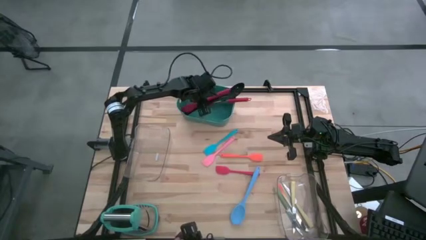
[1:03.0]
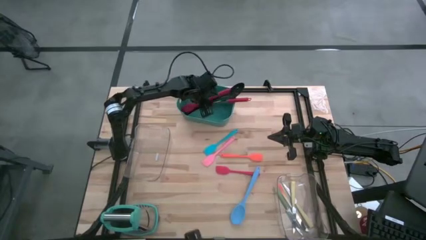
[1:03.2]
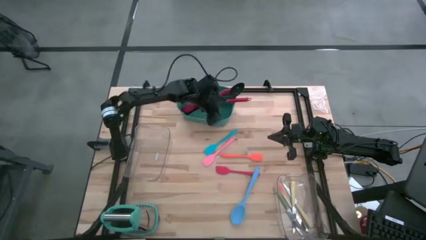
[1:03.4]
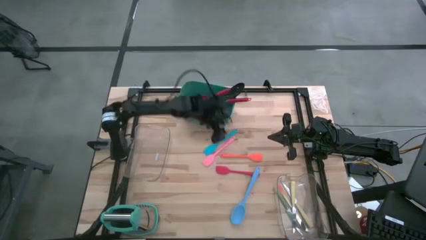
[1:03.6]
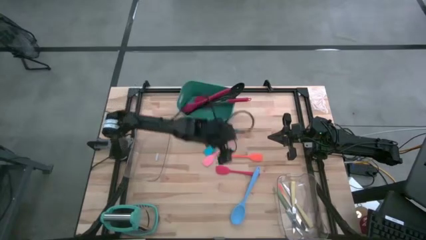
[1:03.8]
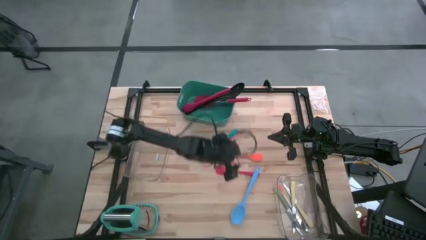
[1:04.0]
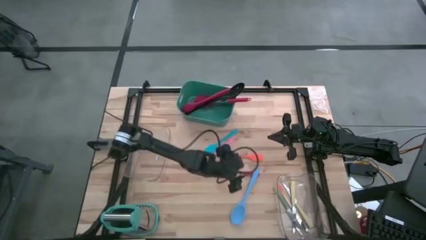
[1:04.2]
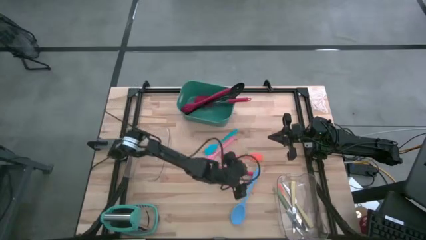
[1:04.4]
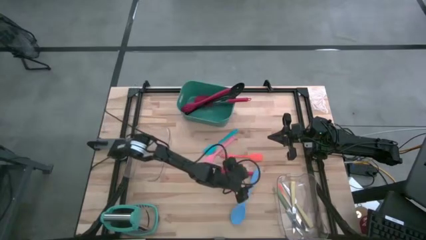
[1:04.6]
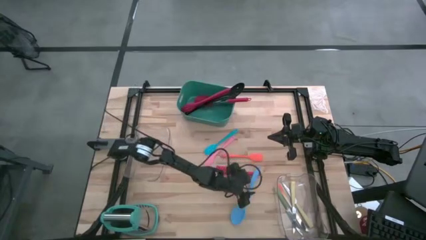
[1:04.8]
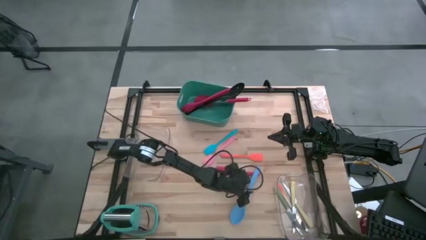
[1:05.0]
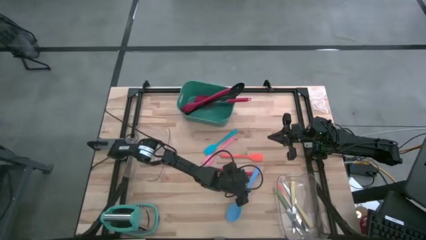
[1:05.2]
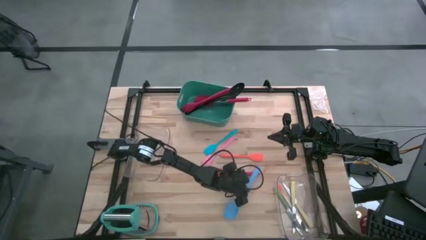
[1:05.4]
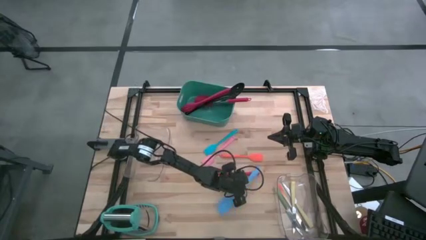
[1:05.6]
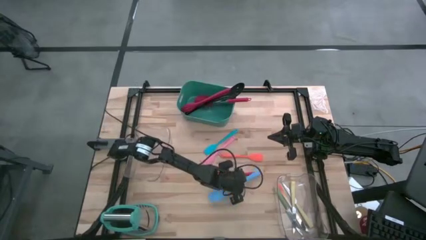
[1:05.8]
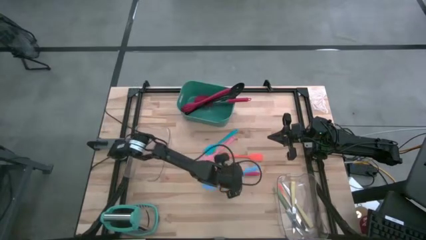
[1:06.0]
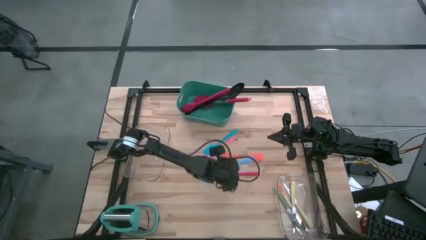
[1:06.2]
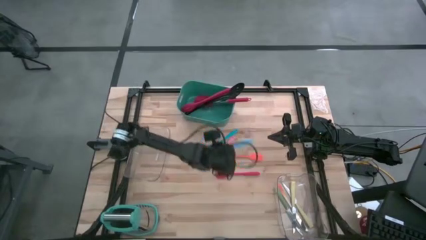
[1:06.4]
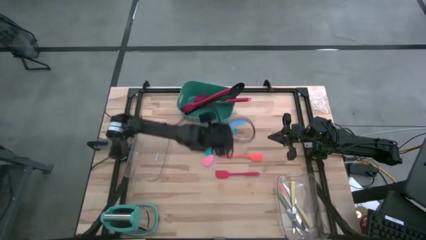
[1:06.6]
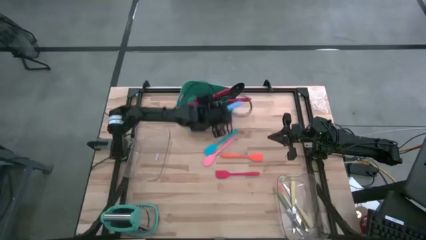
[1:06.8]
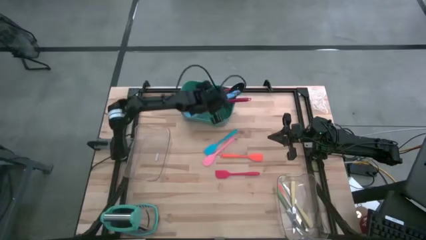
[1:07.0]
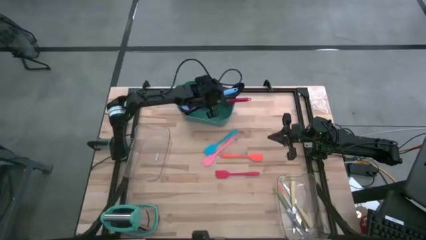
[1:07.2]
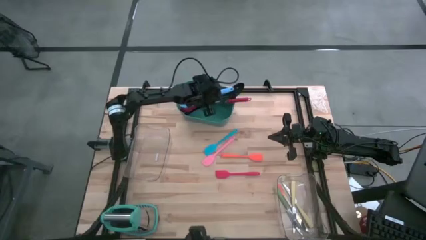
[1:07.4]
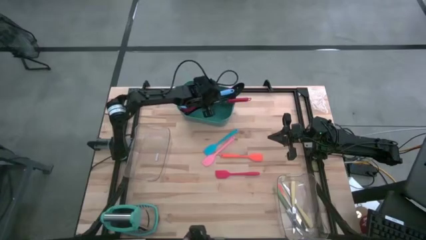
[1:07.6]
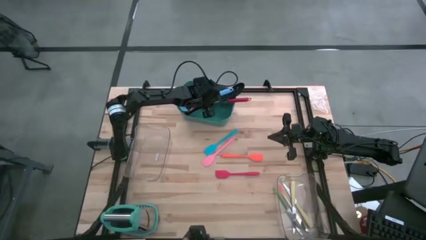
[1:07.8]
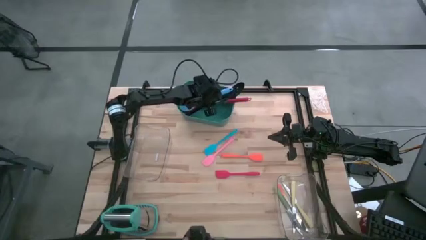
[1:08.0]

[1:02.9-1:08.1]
Task: Pick & Place Kitchen Items
Put the blue spoon into the green bin

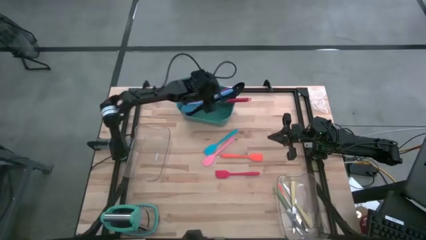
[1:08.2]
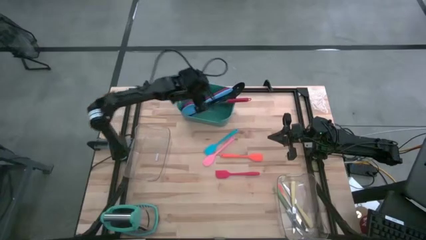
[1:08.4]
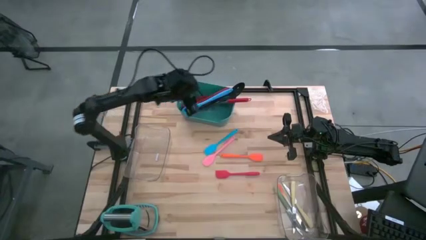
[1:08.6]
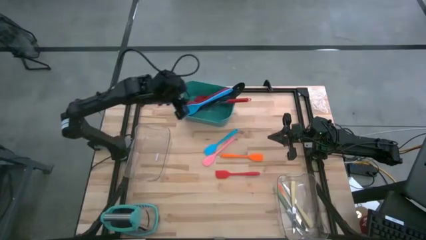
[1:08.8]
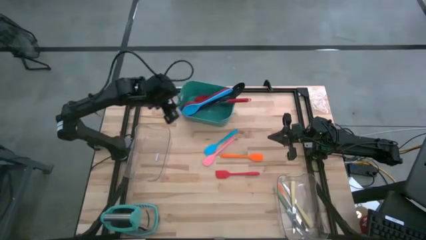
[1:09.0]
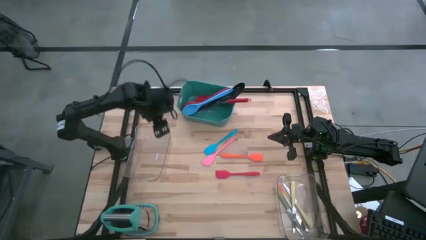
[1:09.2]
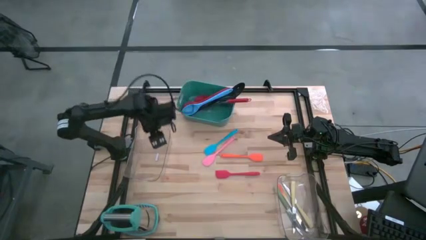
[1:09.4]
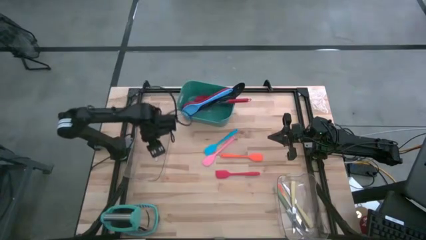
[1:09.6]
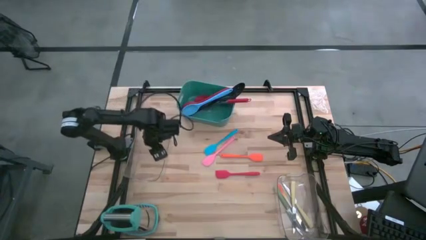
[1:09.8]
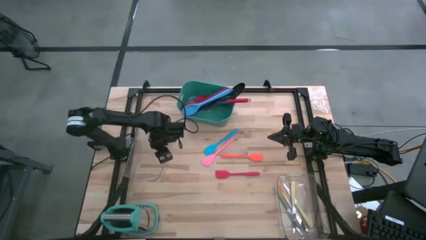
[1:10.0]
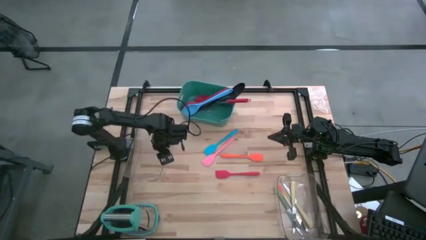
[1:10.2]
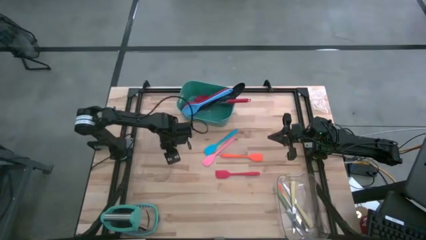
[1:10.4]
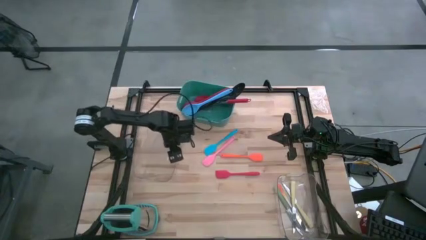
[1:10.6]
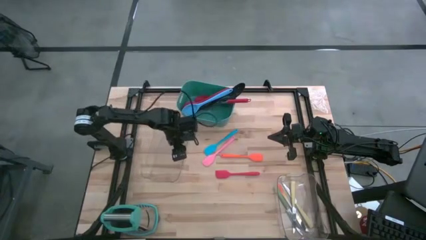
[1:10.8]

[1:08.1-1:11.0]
Adjust the left transparent bin

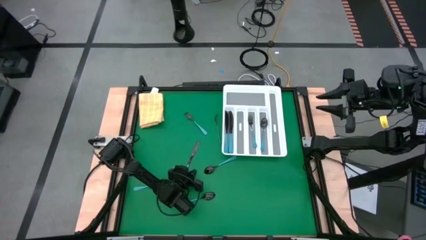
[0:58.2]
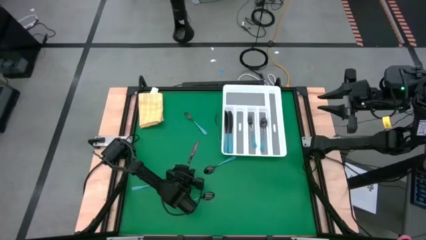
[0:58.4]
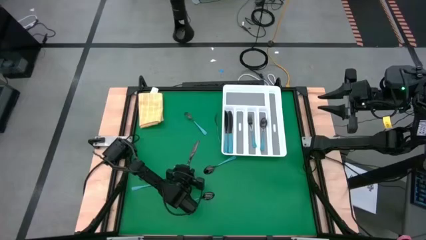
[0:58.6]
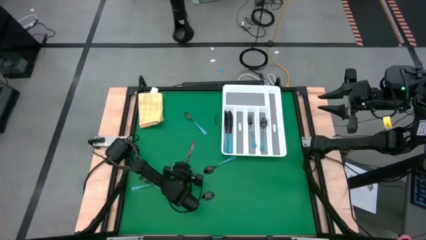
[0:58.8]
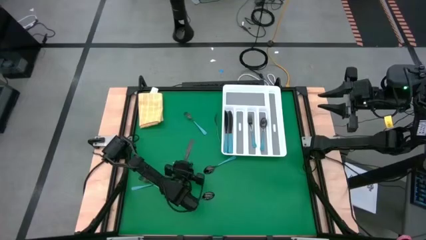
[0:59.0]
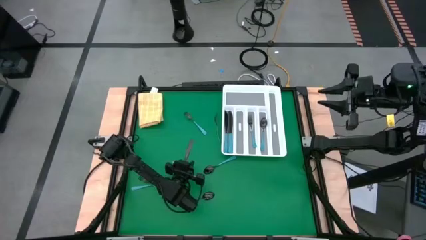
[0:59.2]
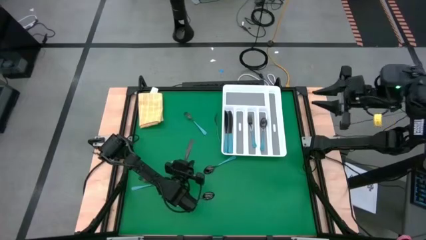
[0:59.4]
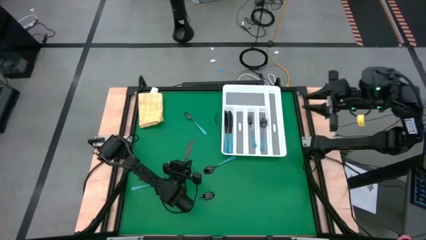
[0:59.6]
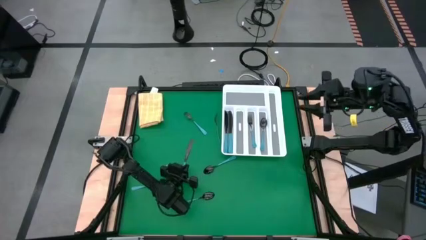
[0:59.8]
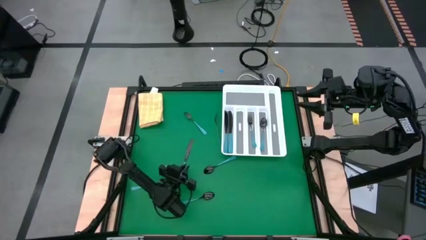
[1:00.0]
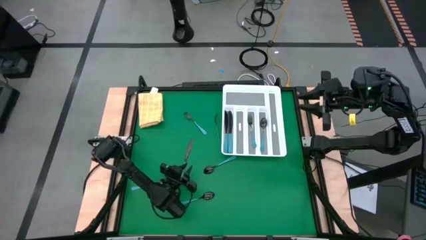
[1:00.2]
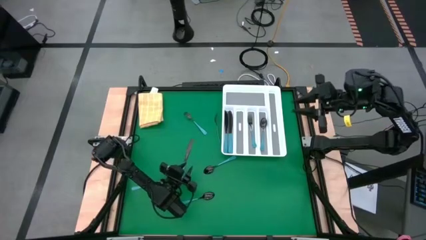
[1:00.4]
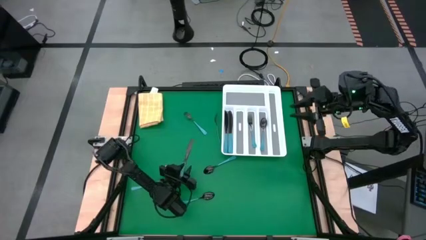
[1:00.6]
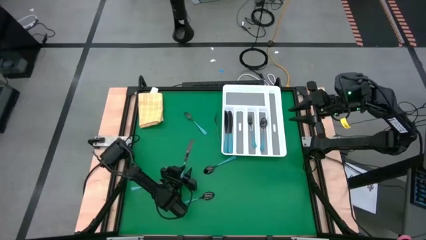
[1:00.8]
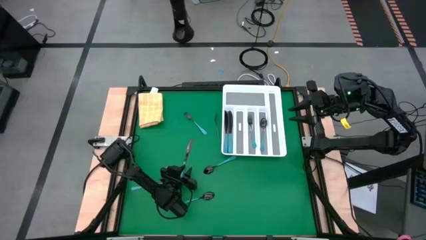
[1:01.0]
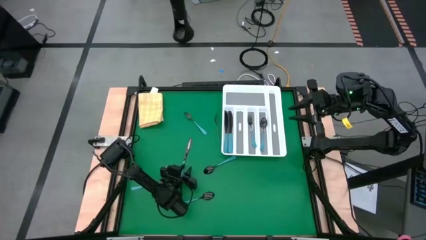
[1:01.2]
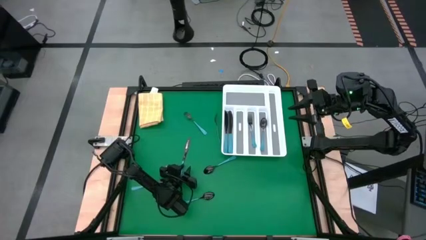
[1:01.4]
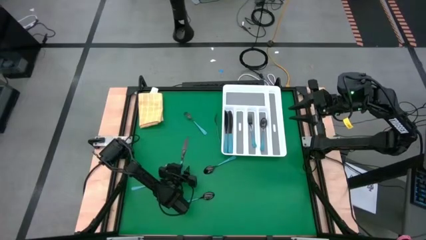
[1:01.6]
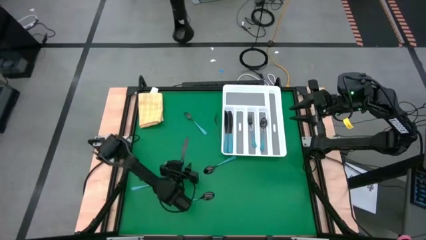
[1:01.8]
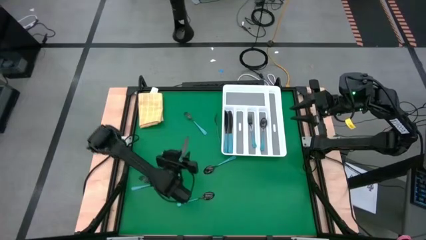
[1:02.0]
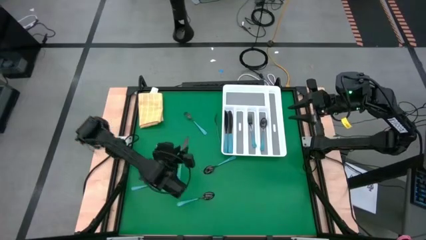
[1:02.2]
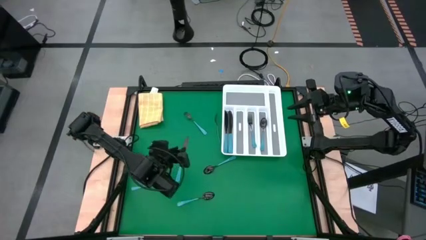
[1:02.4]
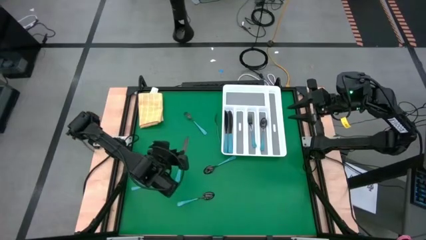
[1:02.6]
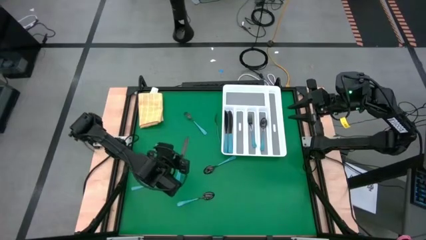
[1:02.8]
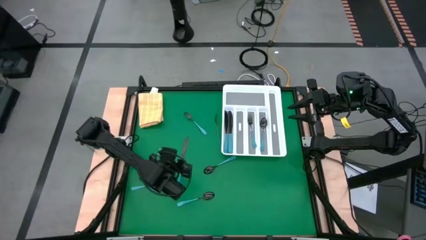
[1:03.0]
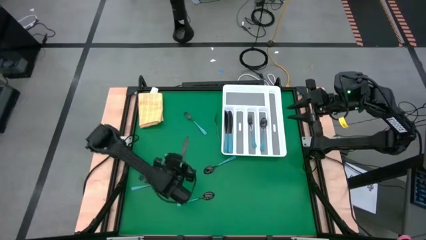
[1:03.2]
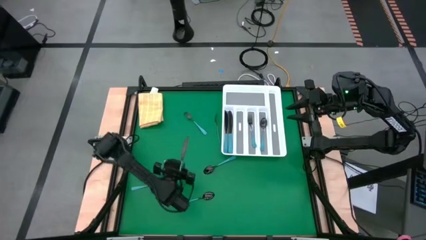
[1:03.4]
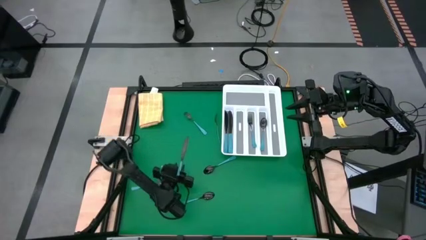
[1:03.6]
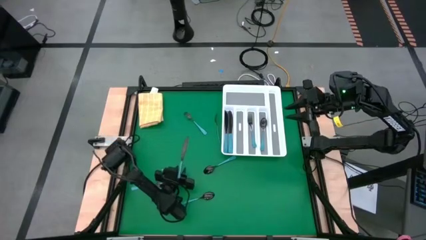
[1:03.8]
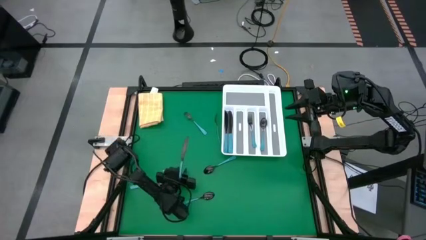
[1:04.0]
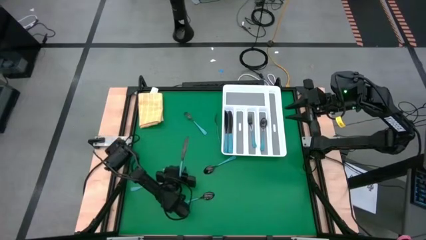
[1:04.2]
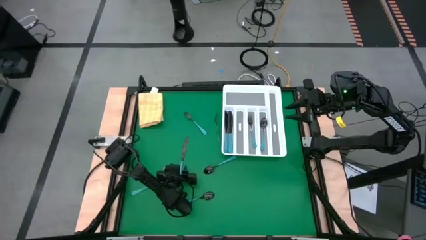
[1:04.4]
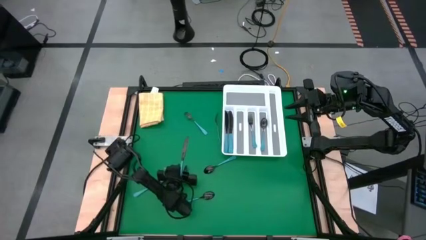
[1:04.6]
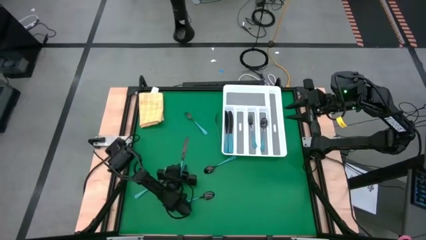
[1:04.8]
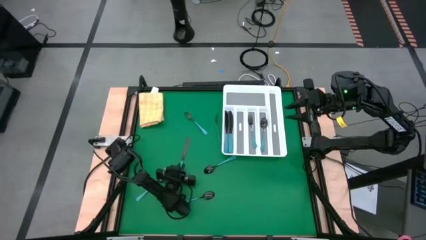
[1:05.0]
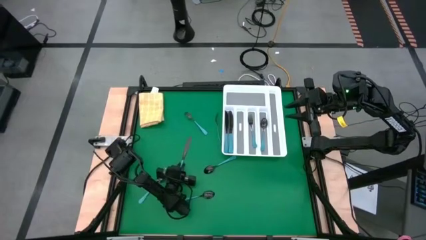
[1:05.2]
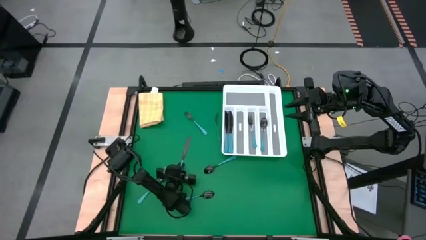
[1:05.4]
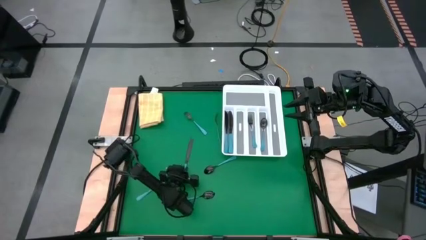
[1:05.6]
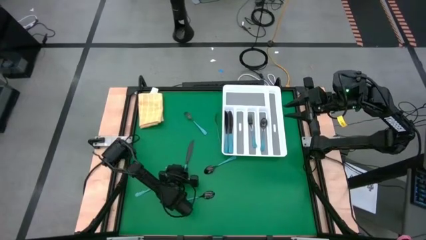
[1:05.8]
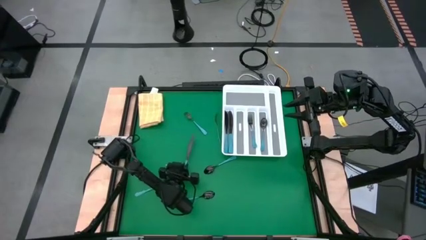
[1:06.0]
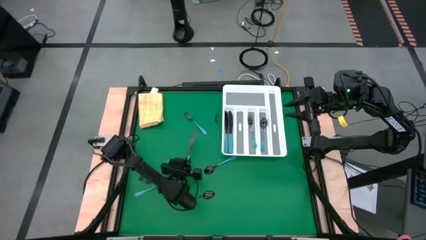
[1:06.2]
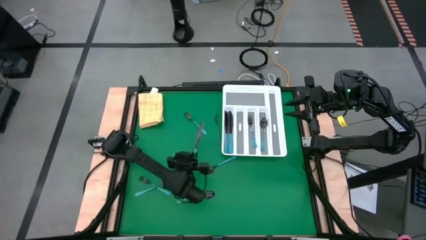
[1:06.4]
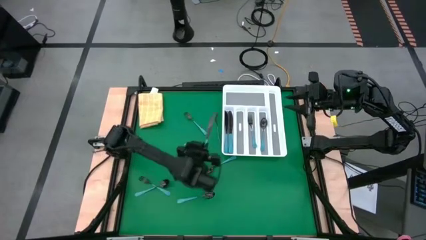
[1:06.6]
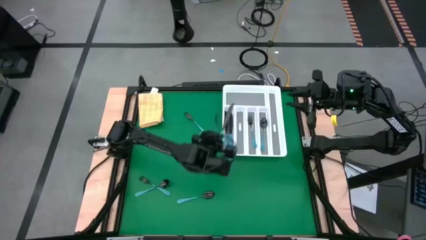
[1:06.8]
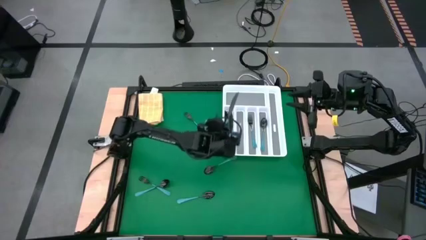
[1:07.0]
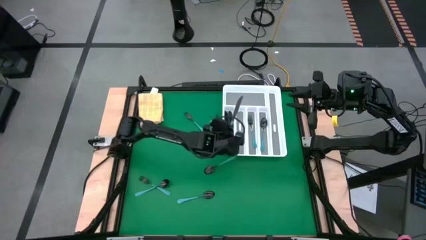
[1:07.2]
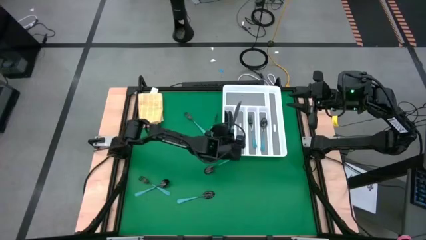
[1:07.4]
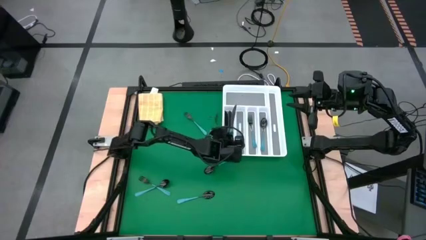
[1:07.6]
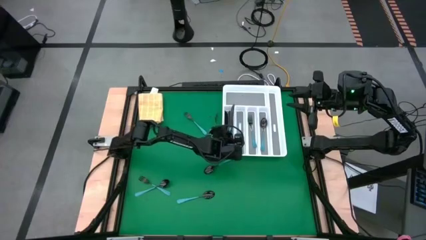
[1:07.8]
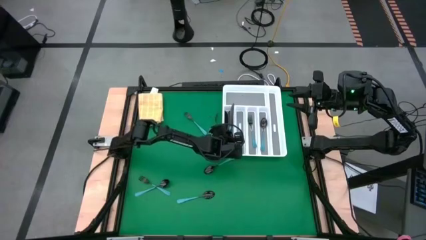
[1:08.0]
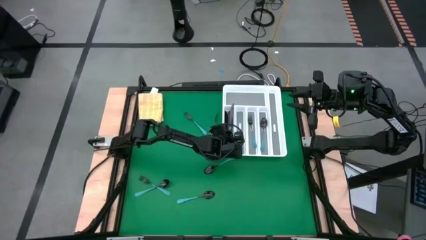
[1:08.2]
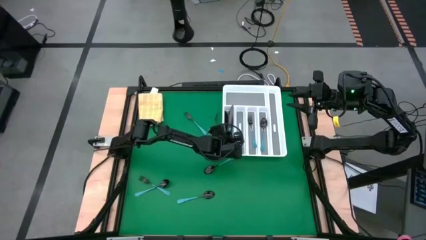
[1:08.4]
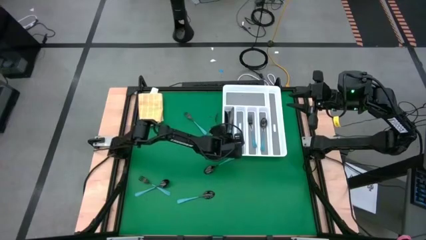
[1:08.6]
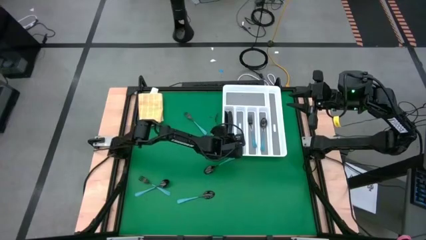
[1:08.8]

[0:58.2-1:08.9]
Task: Sort silverware
Put the blue knife into the white cutlery tray
